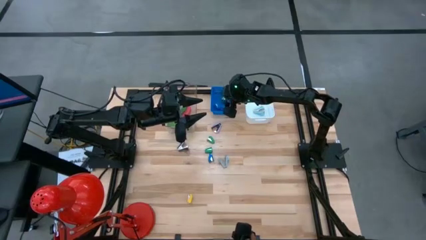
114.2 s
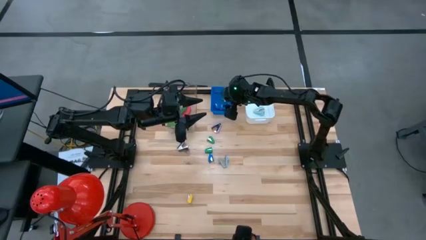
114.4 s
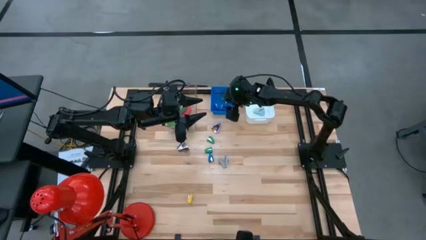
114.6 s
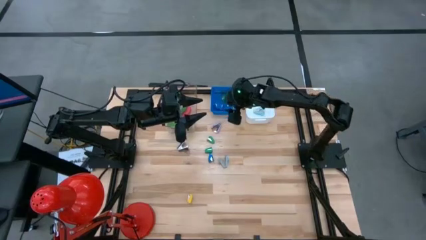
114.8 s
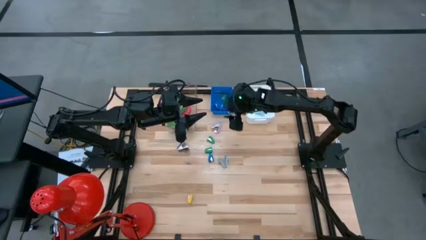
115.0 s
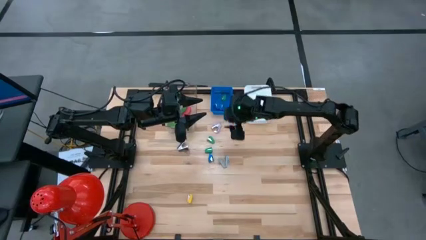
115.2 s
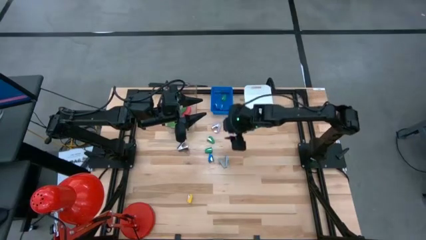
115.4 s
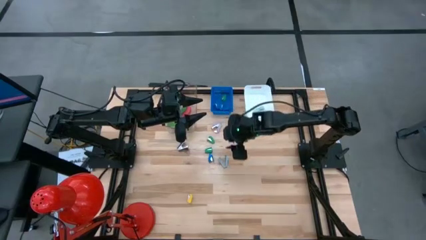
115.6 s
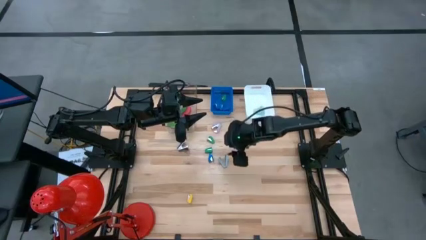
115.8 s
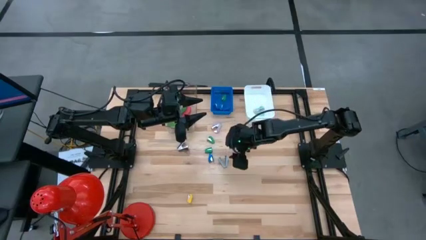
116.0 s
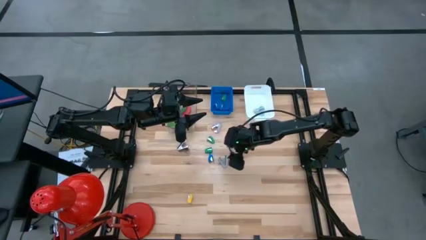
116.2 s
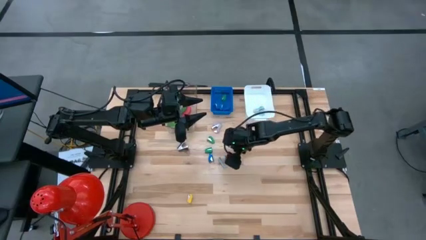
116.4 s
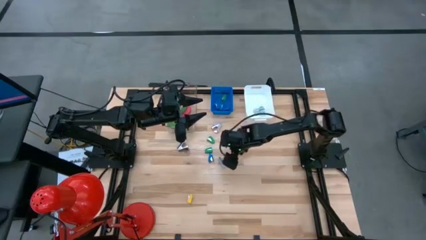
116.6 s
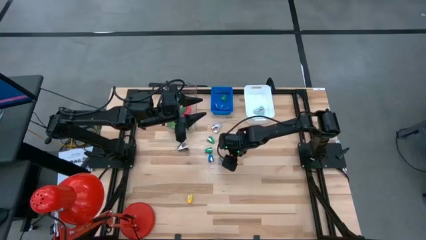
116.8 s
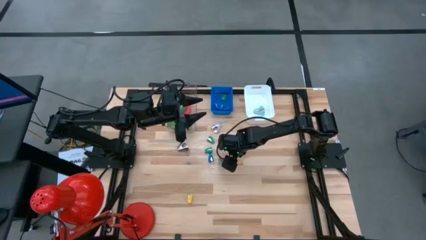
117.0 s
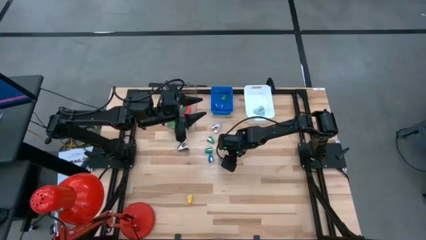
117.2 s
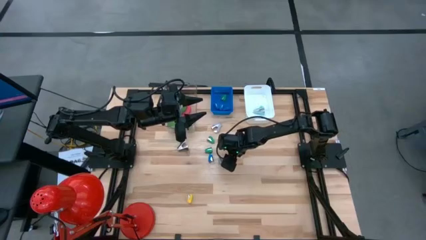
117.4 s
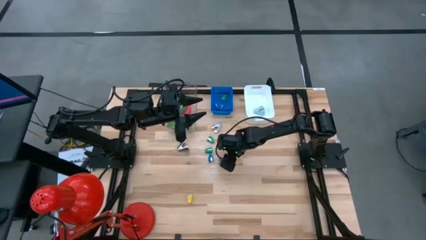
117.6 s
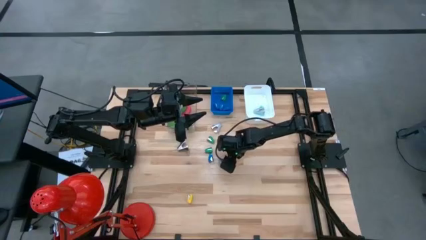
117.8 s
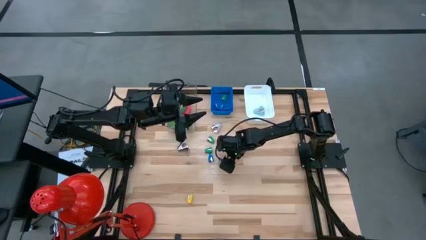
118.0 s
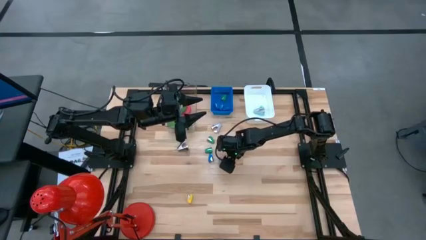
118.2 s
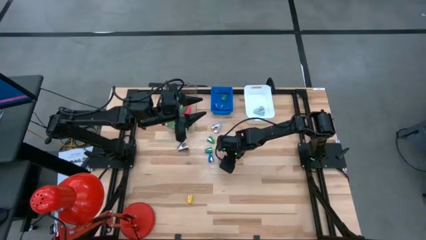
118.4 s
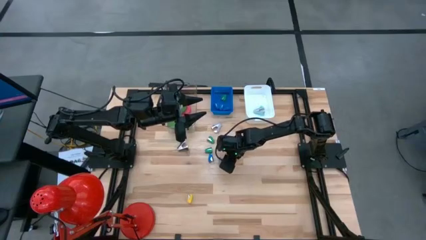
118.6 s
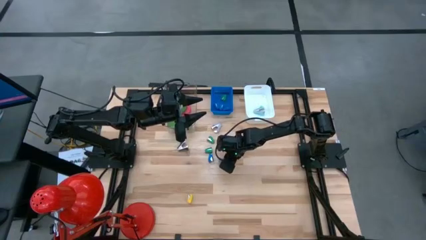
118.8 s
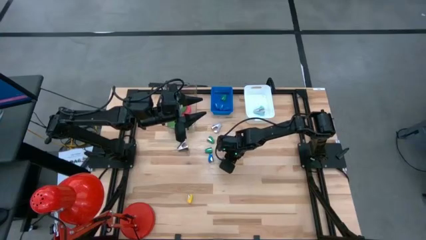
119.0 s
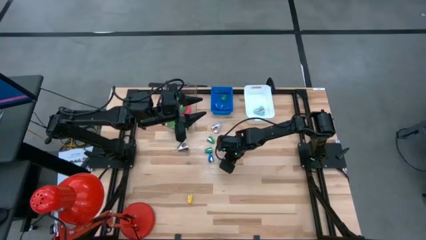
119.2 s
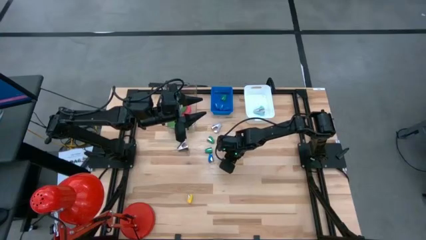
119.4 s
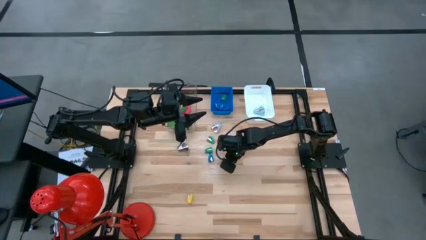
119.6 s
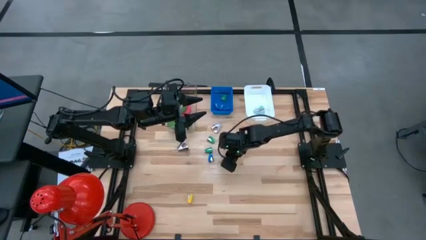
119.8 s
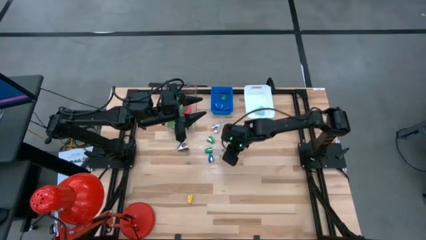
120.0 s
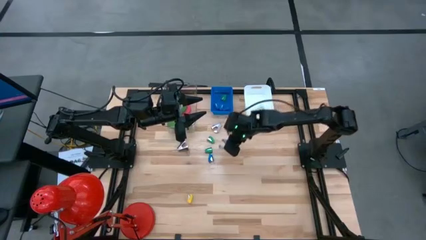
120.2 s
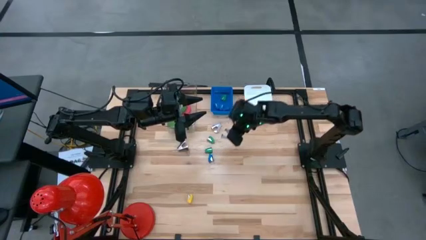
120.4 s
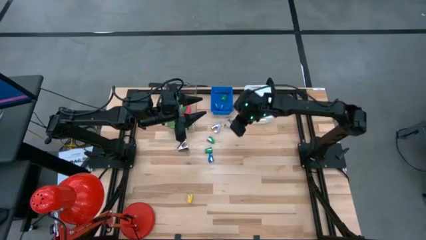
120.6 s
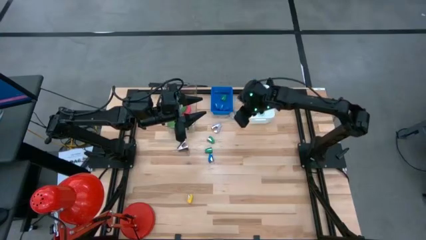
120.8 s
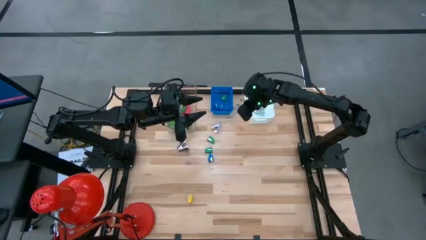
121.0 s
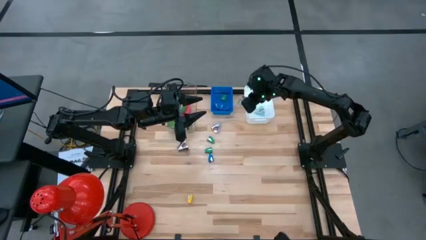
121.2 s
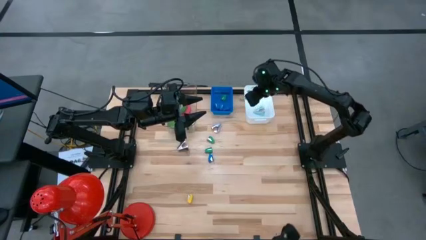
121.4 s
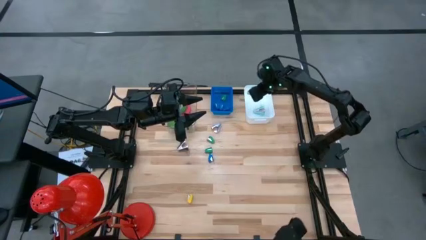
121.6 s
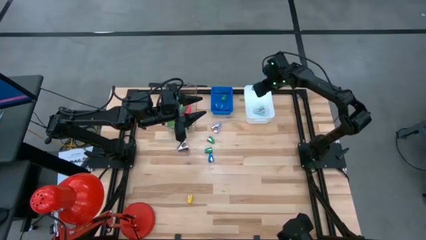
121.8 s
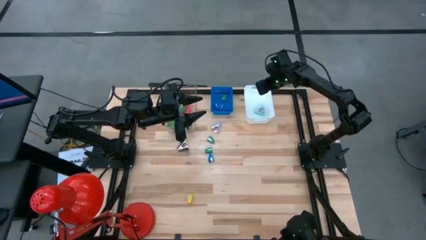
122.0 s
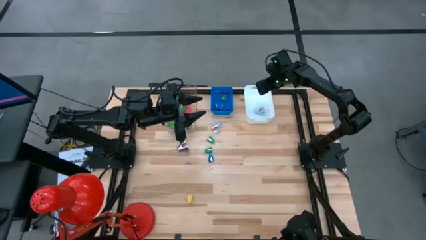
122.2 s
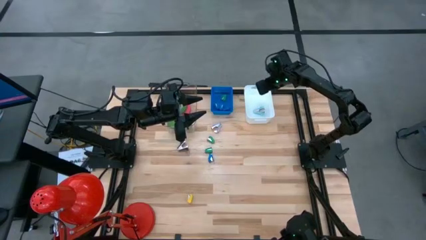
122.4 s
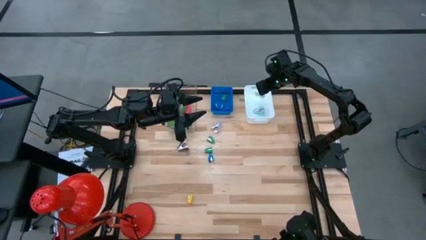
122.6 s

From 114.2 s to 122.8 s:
Task: Pick and place Stapler, Stapler remover, tape
Put the gray stapler remover into the white bin

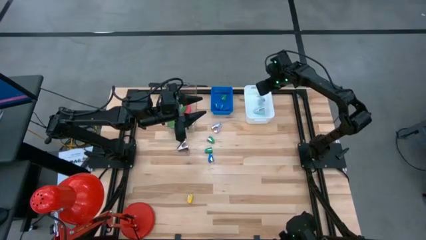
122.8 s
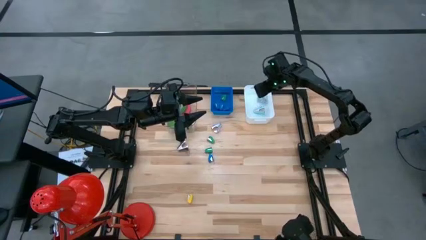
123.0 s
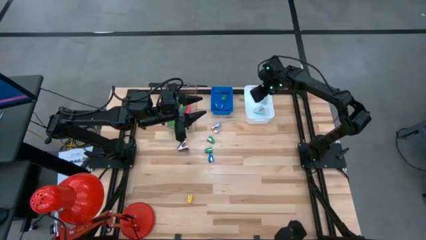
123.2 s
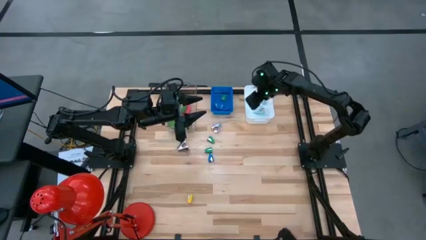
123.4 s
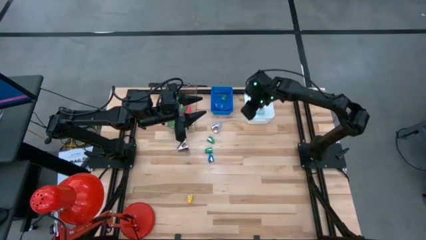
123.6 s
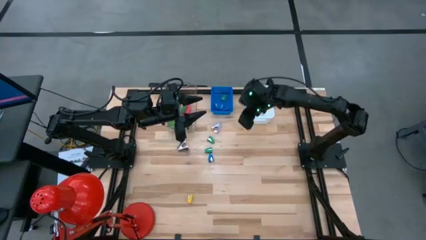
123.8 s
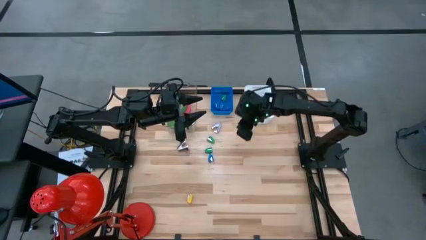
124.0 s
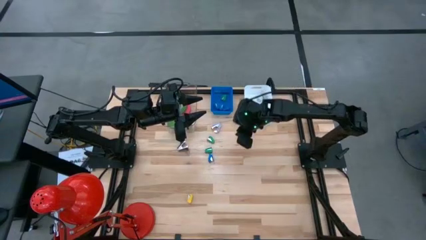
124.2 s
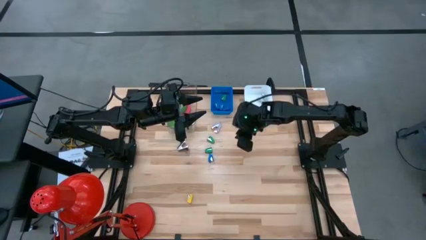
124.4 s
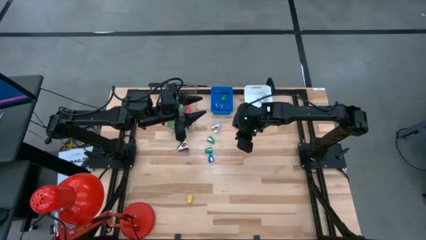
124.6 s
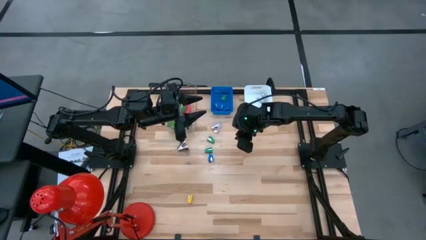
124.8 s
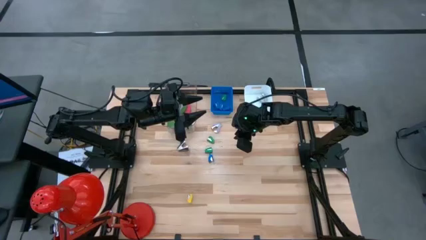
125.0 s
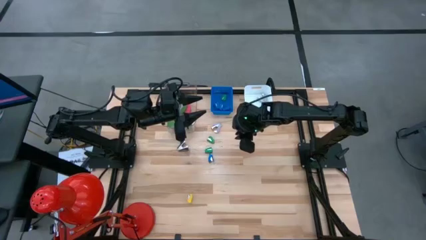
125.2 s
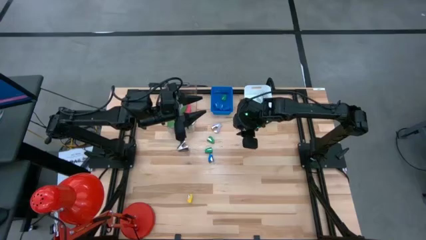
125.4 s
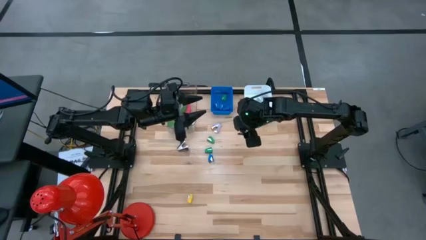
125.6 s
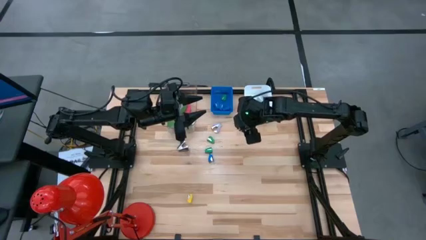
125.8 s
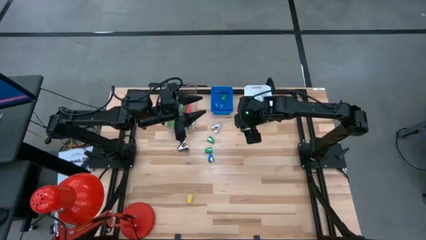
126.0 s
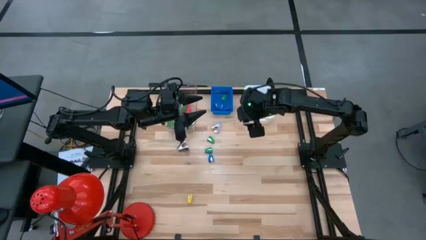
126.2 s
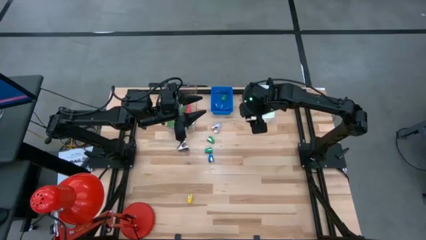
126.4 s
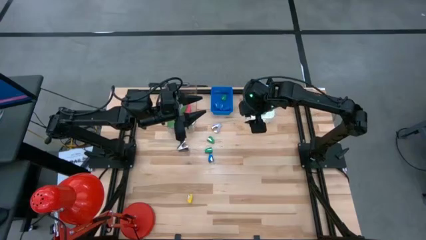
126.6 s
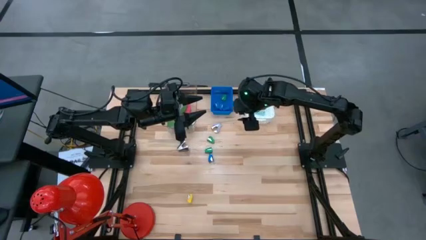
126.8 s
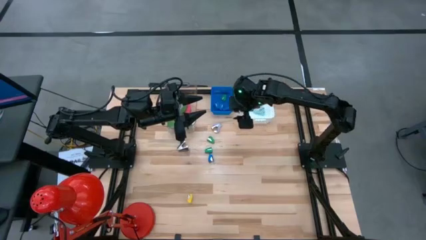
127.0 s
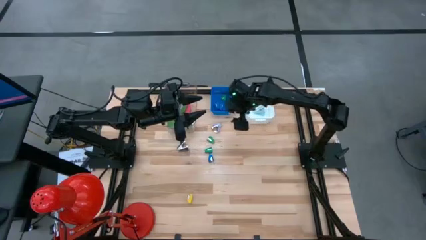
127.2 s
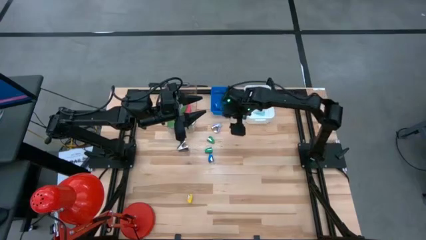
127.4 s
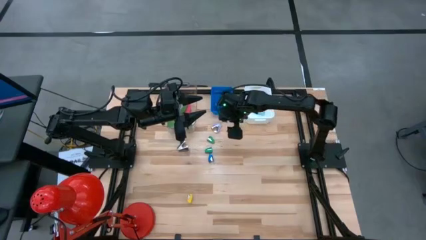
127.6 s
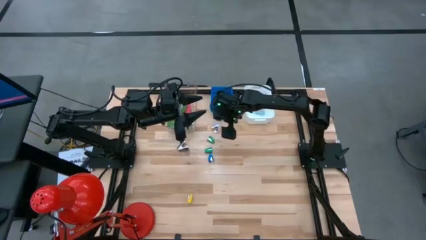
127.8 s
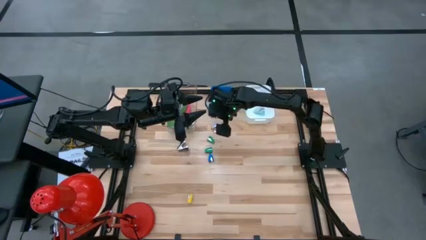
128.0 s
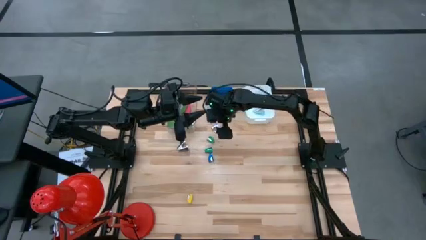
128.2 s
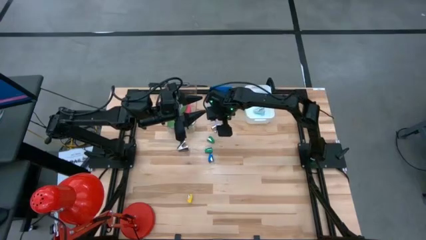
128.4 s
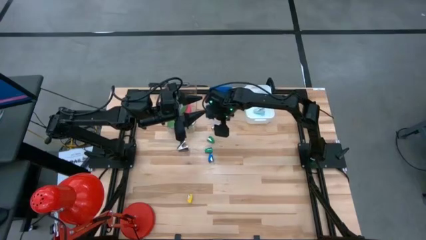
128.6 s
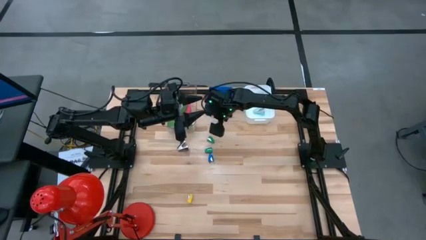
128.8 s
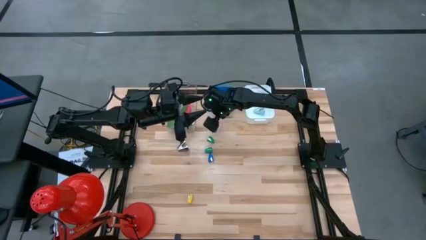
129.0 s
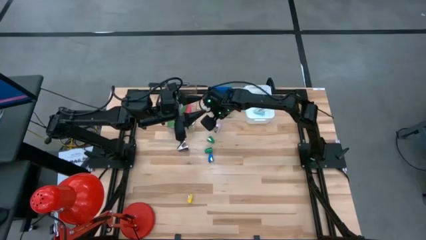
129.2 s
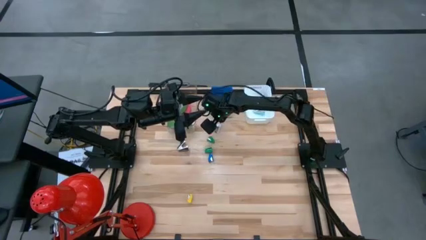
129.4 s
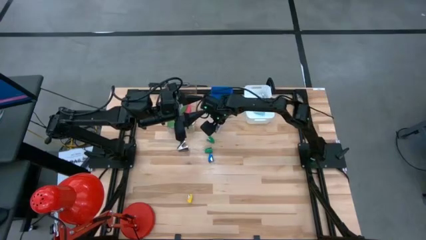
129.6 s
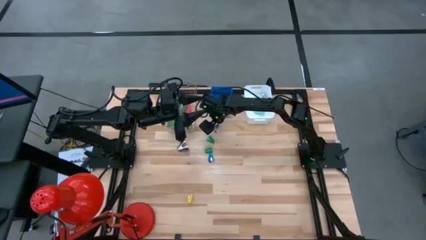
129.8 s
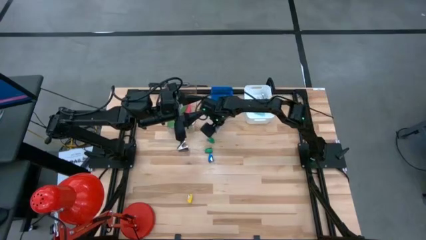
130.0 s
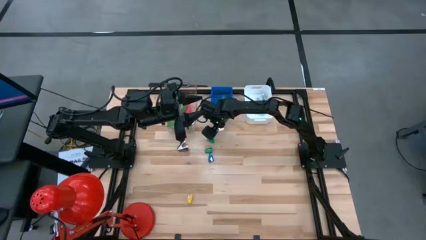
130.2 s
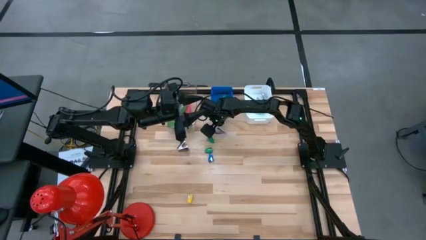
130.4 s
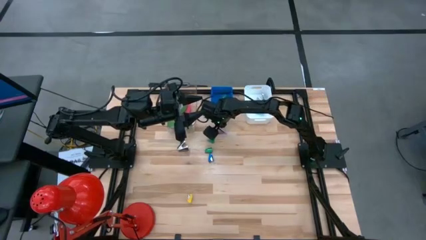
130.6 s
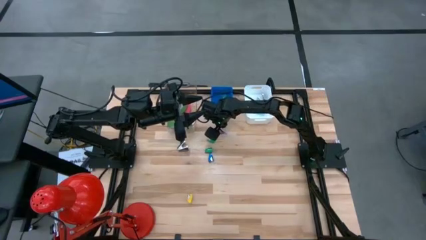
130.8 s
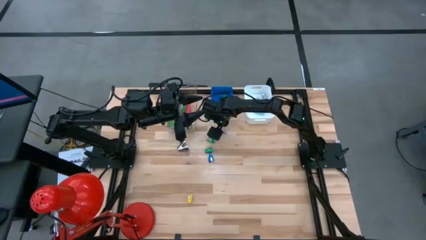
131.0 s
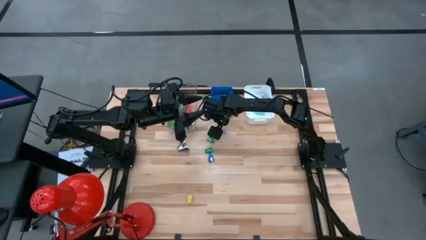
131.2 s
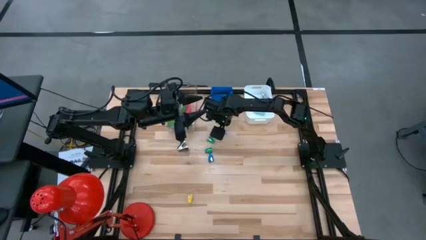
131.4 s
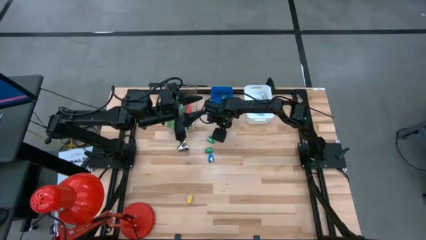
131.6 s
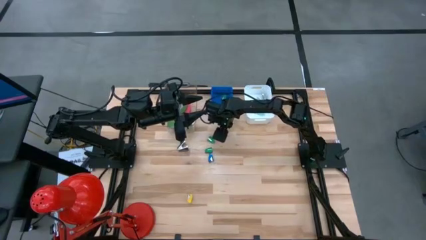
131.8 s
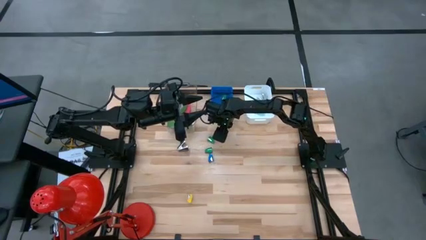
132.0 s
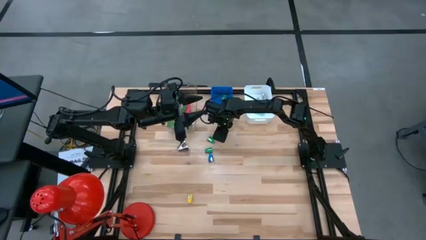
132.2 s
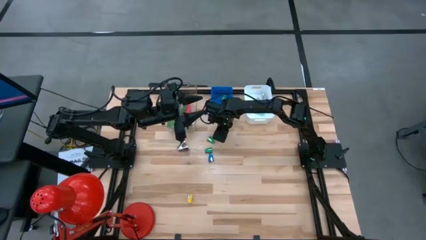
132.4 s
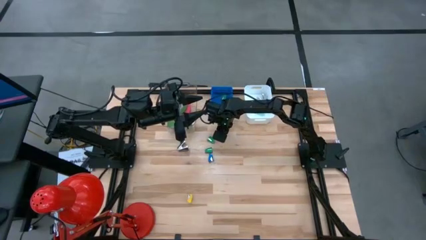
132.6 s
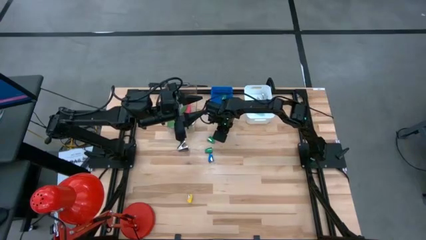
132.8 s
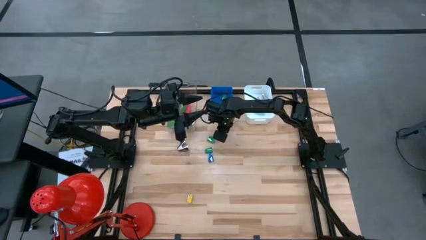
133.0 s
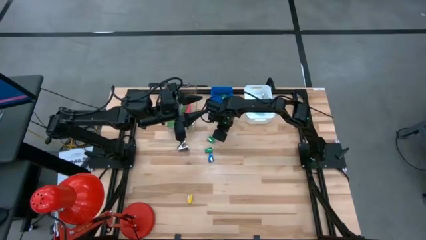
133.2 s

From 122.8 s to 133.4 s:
Put the purple stapler remover into the white bin
